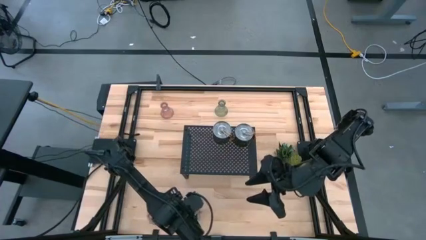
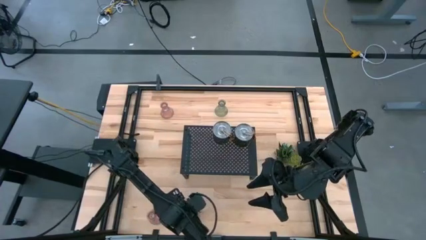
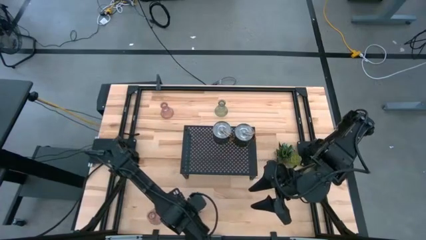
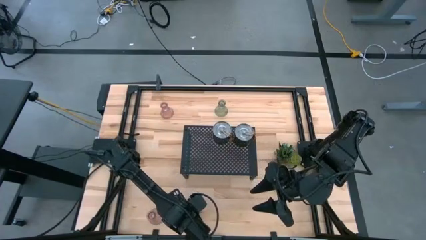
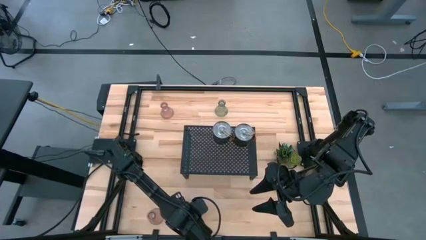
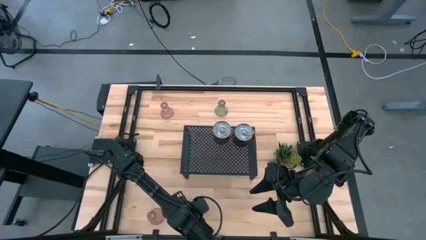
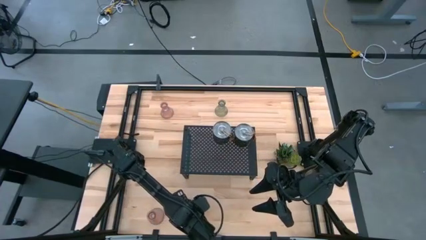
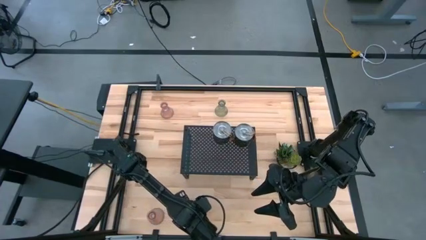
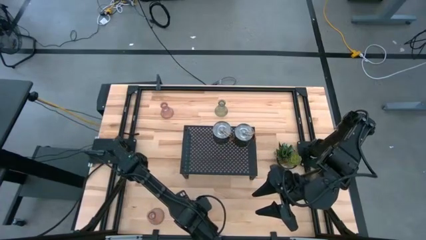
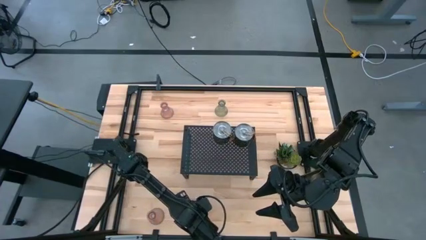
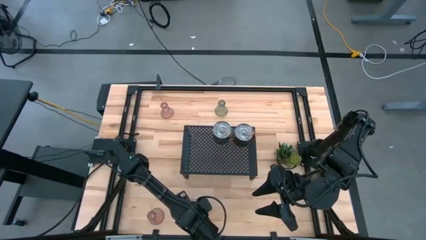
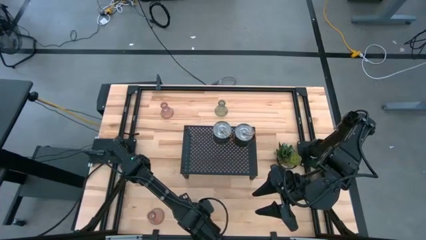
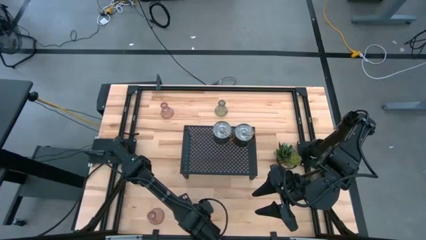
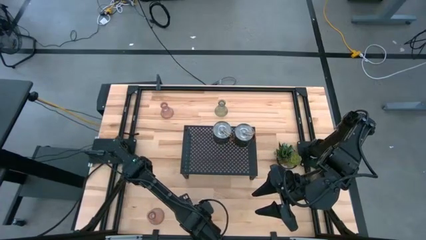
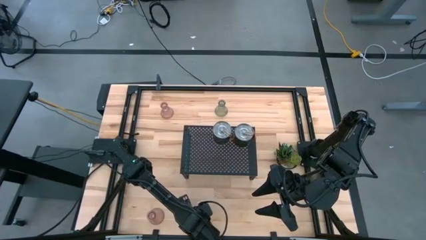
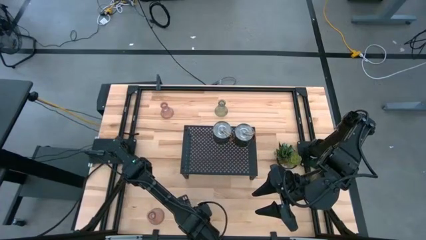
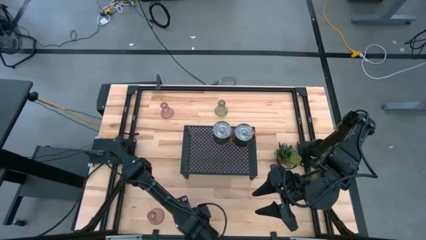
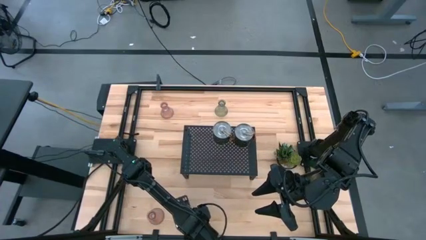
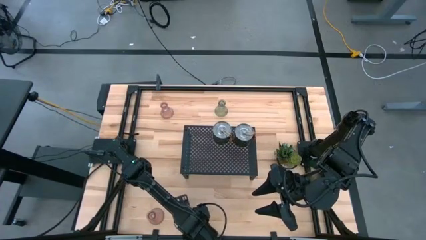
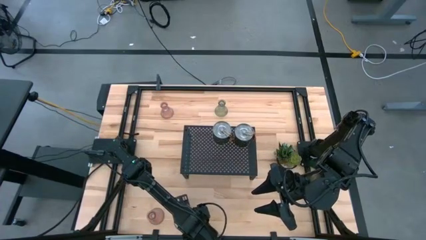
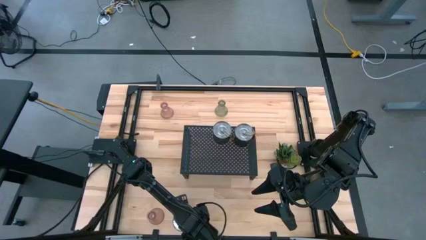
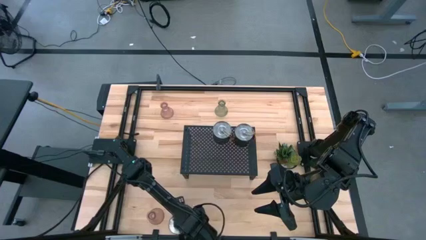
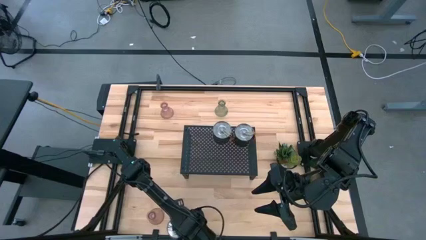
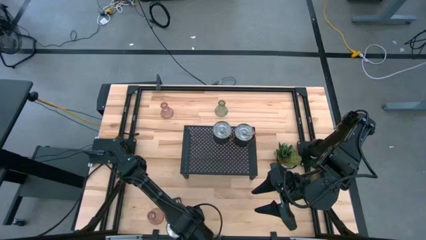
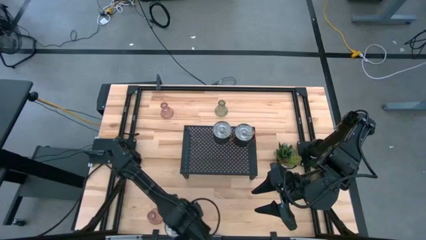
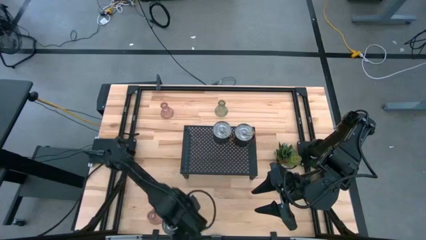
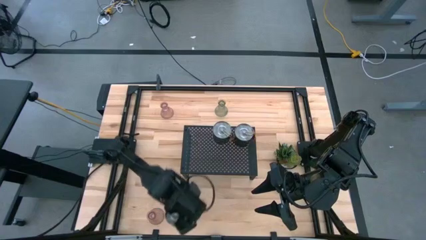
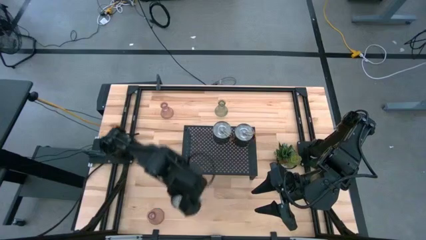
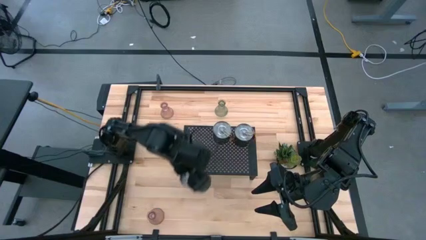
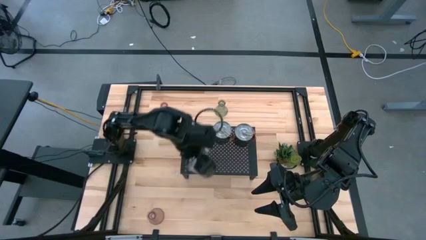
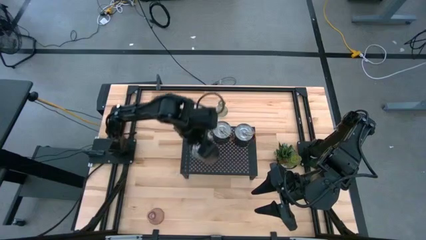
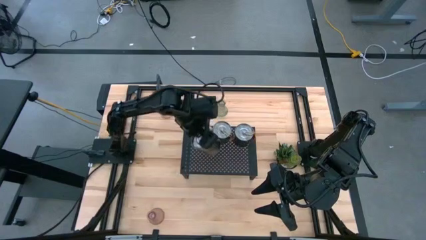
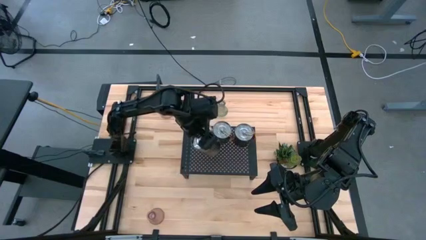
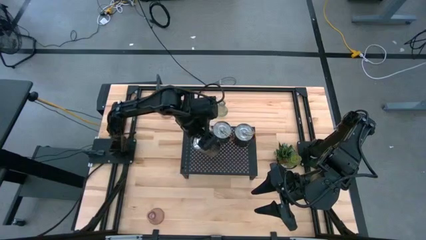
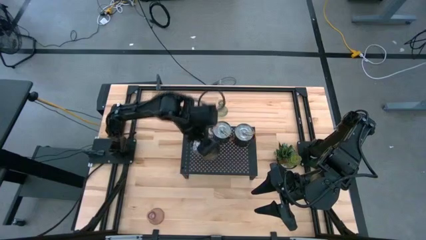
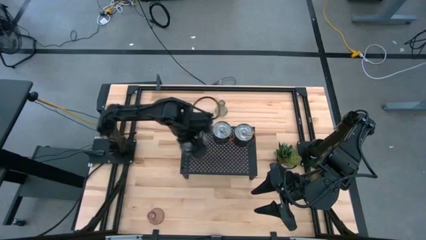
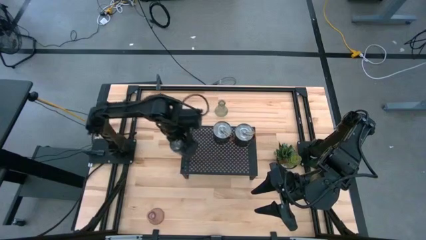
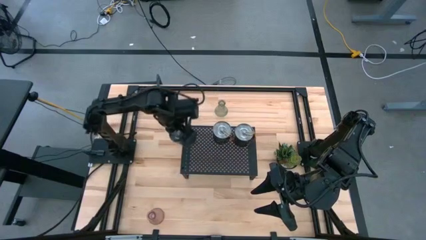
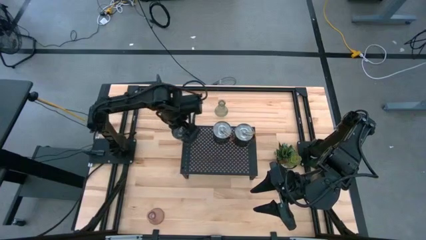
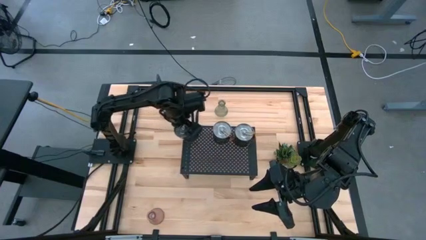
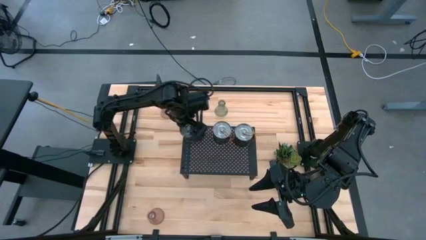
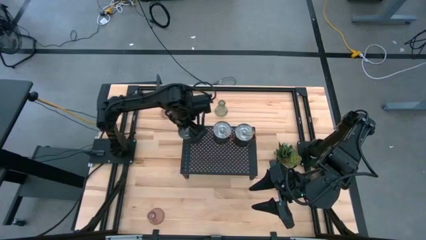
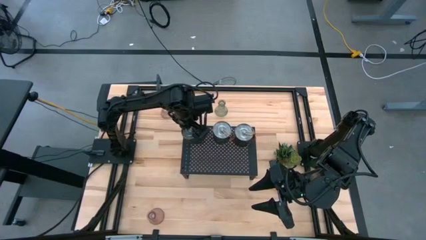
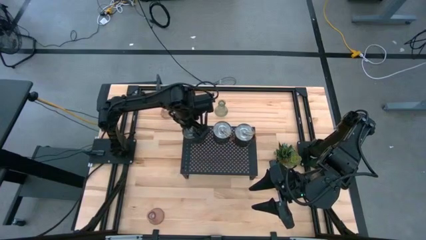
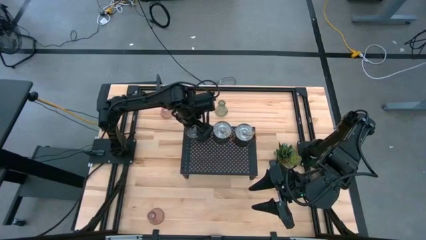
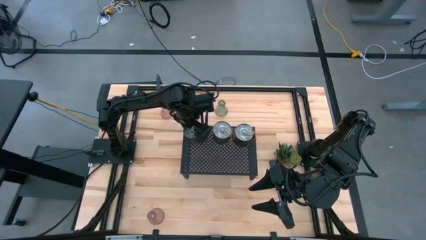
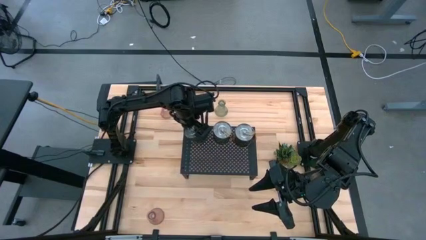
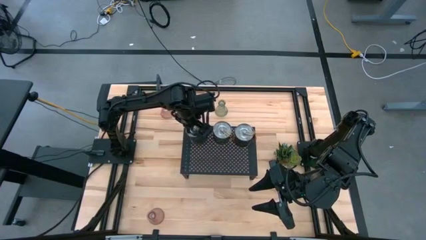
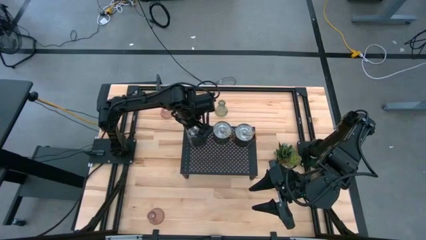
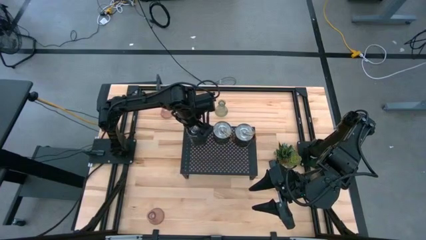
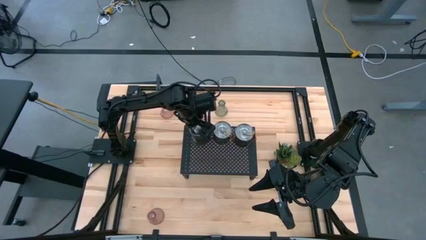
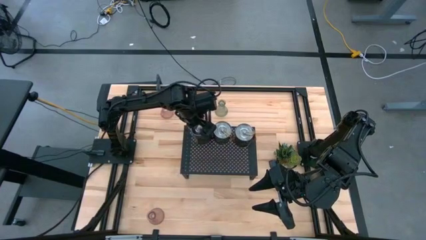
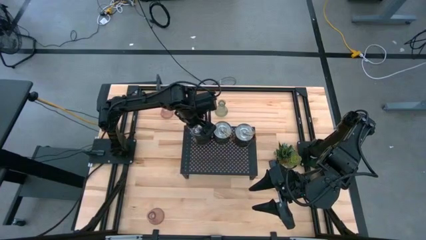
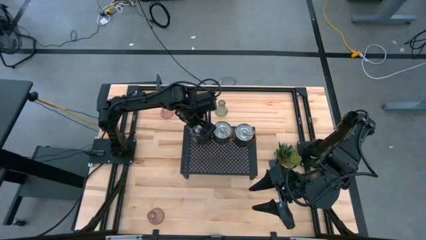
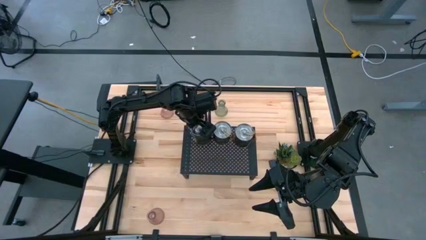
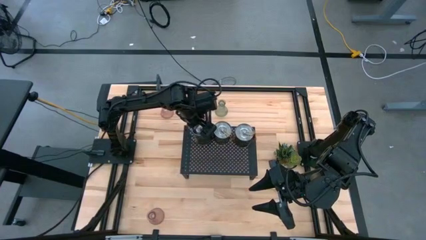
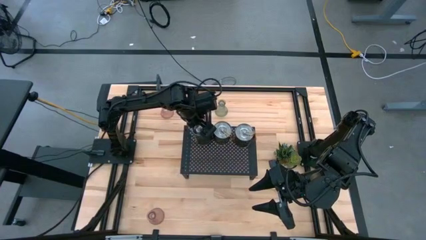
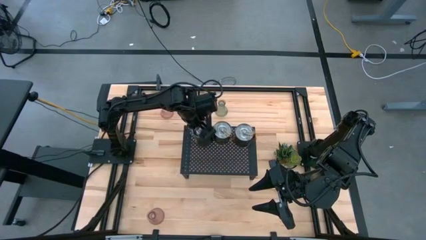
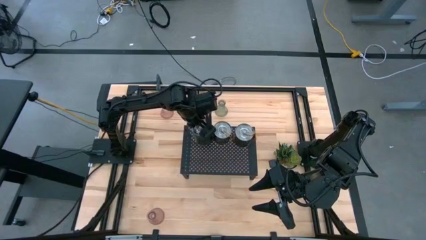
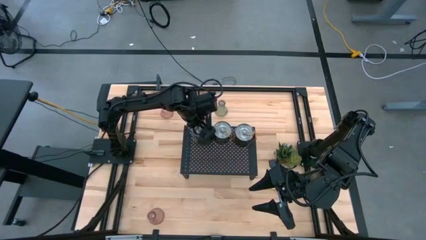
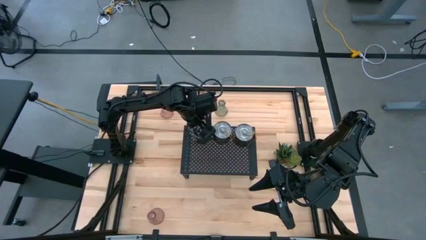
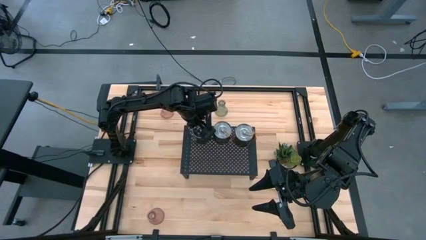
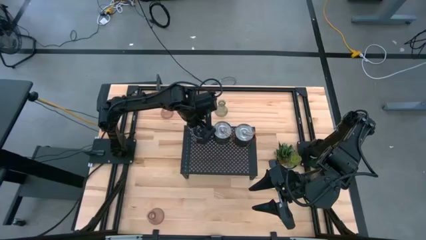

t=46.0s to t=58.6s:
Task: Pick & Place candle stick holders
Put the brown scented candle on the shelf aligned with the other scented candles

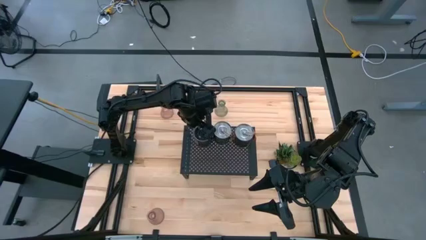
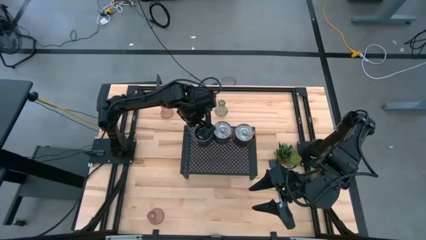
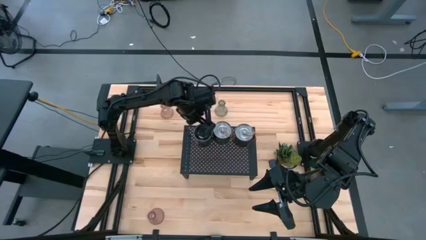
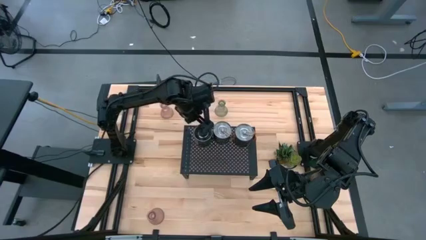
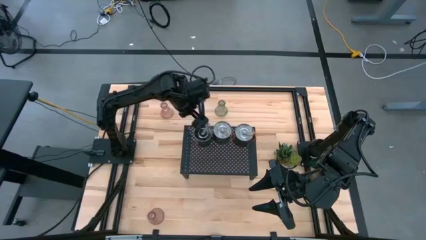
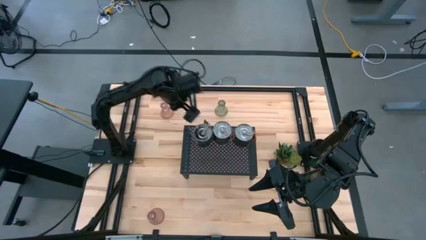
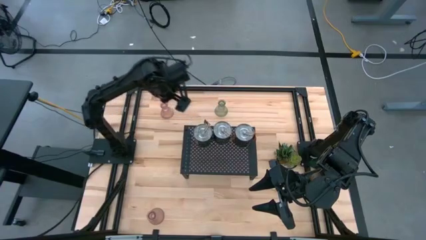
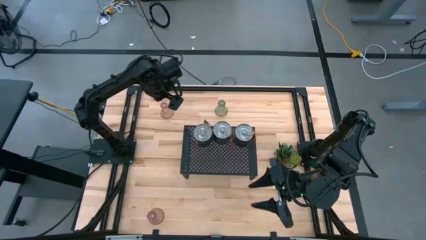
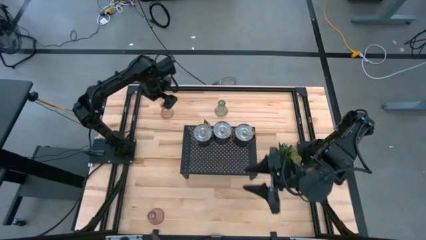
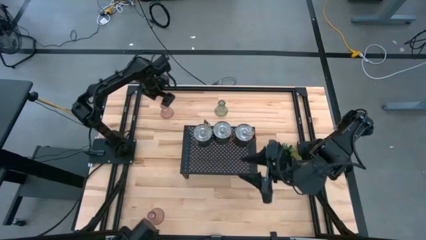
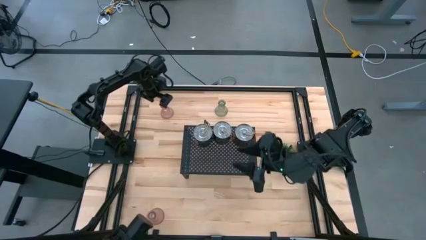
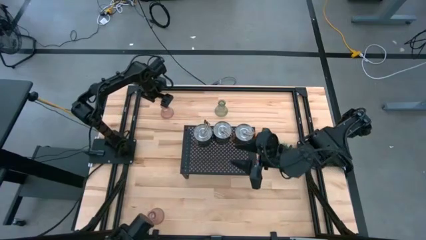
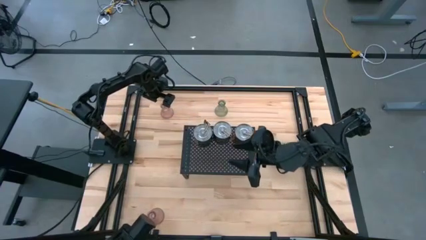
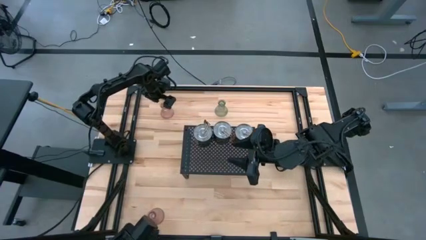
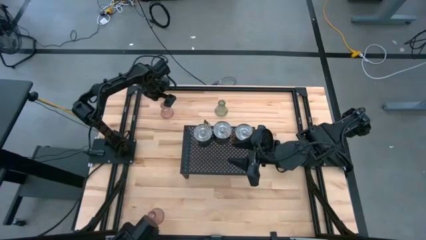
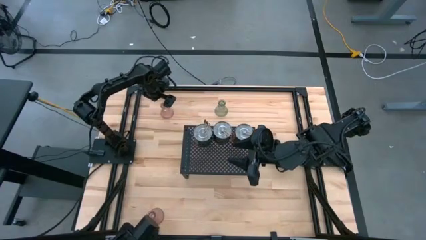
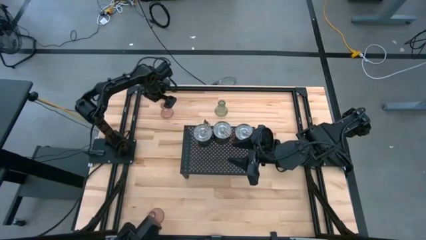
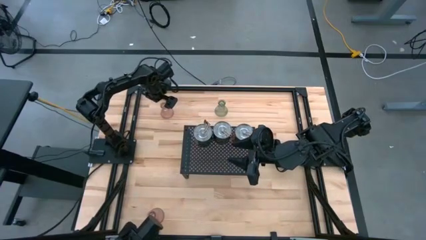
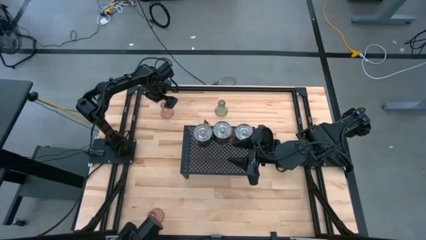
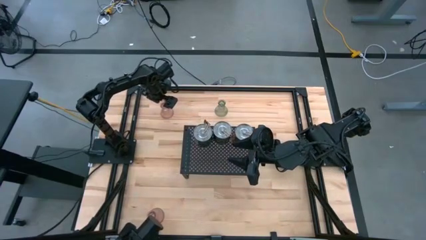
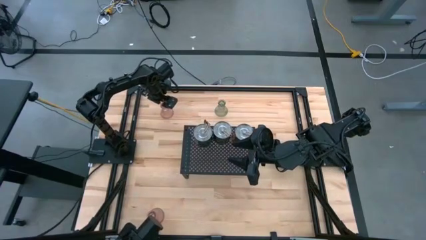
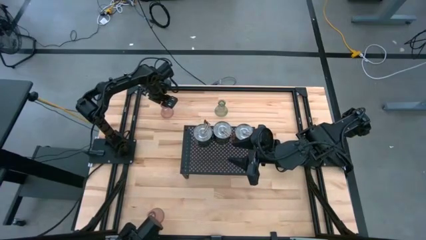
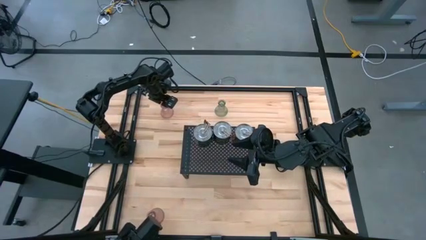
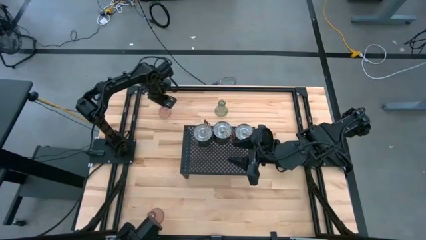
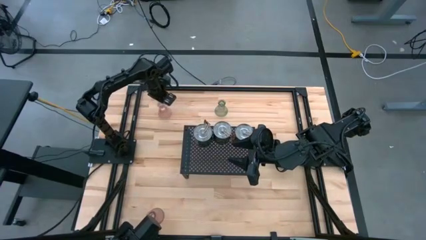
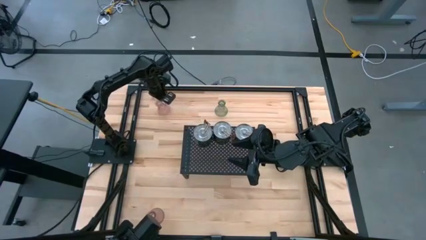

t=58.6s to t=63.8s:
Put the top pink glass candle holder on the shelf
